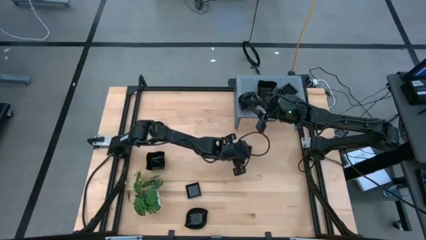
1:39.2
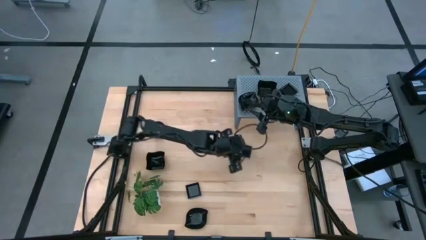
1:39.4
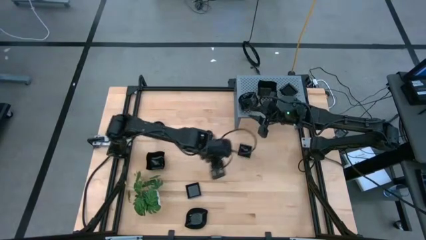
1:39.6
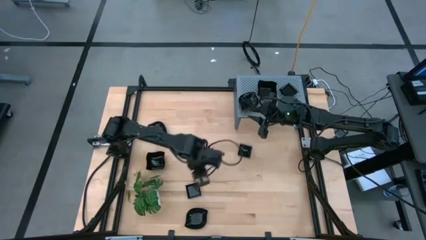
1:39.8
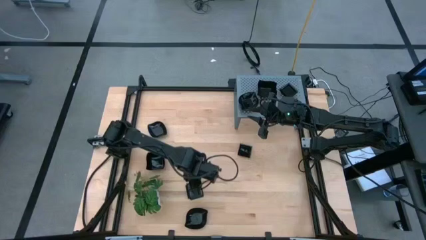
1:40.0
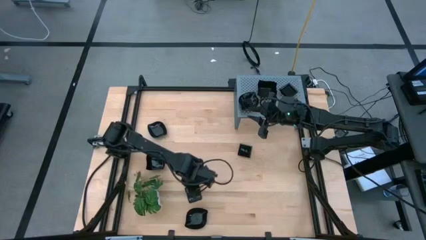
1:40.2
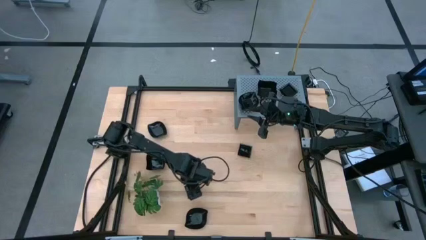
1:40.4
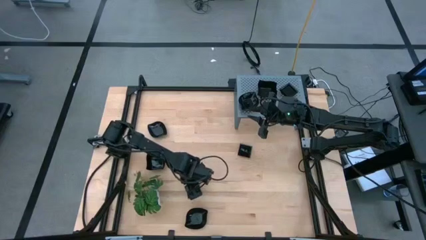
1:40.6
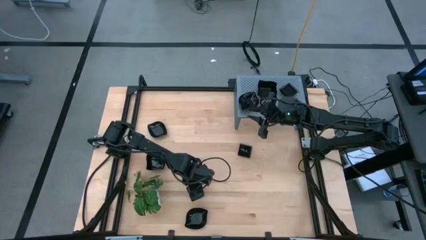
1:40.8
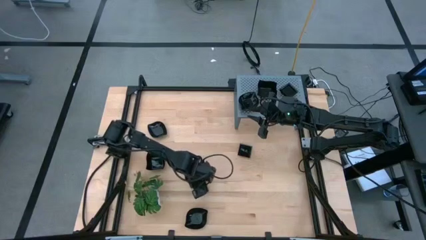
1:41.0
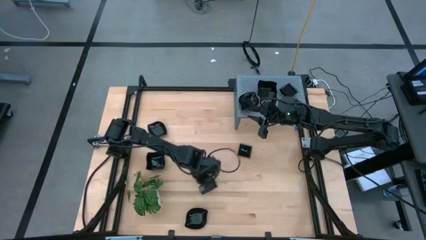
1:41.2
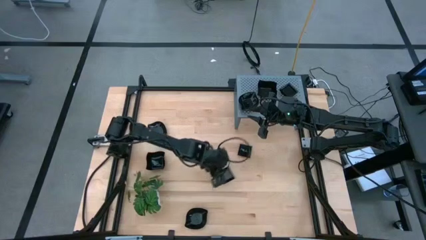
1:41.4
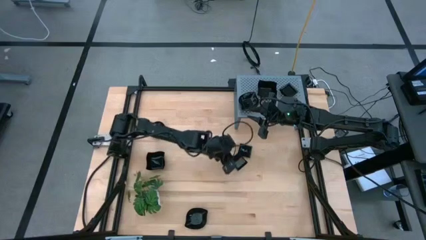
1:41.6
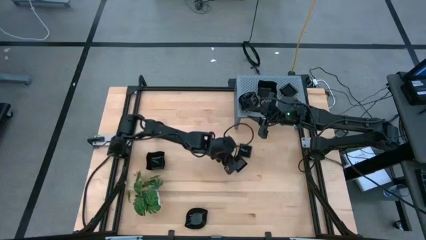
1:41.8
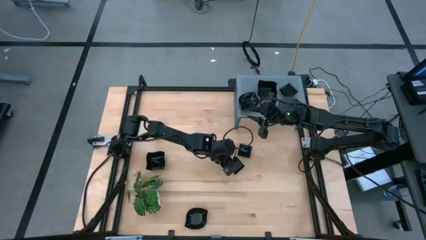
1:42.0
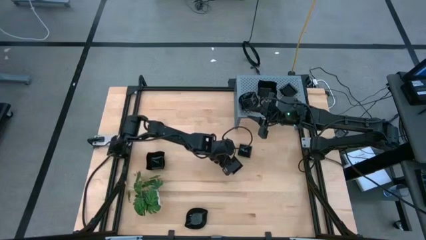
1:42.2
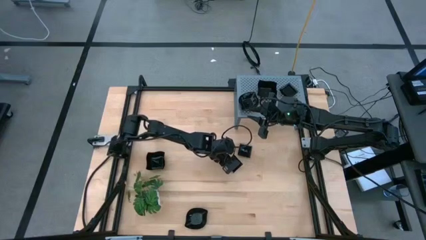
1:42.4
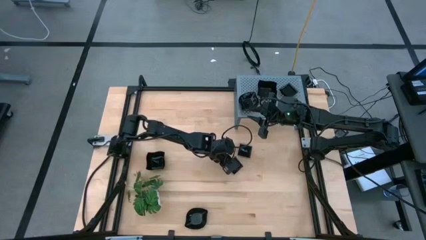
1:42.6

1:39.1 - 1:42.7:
Task: Pick & Place Mini shaped plates
Move the square plate to the middle of the table

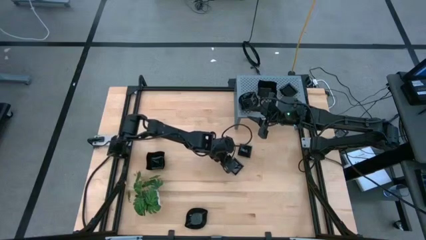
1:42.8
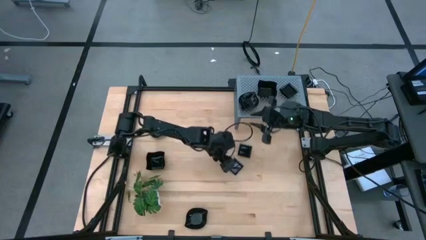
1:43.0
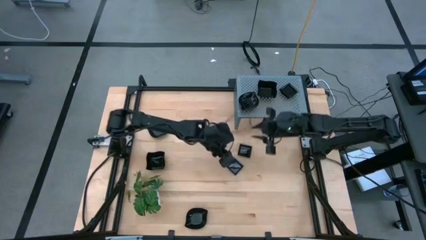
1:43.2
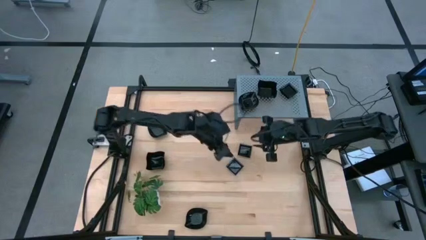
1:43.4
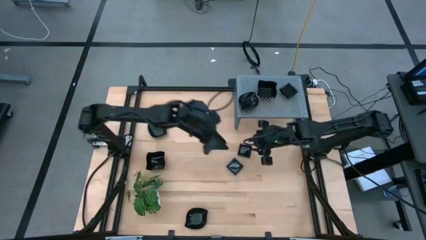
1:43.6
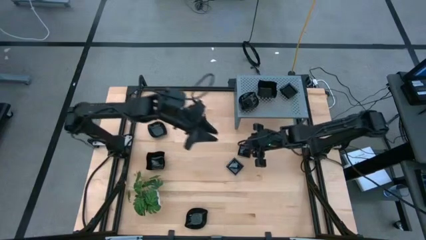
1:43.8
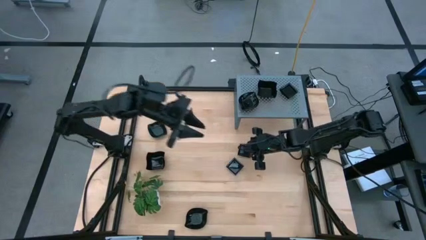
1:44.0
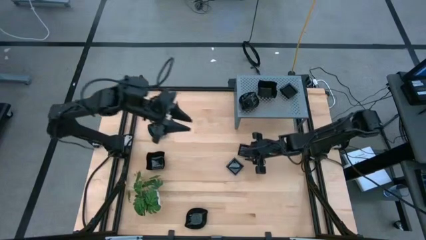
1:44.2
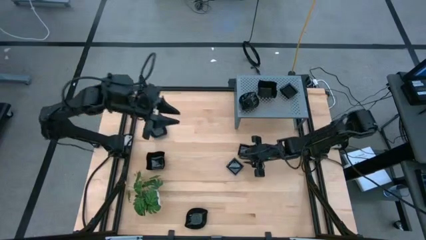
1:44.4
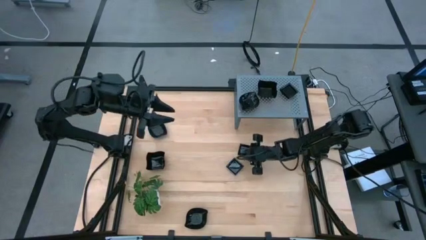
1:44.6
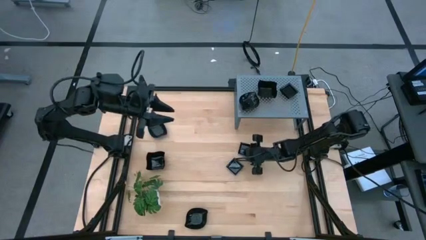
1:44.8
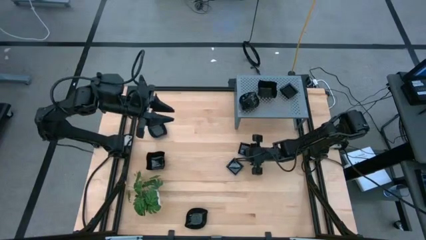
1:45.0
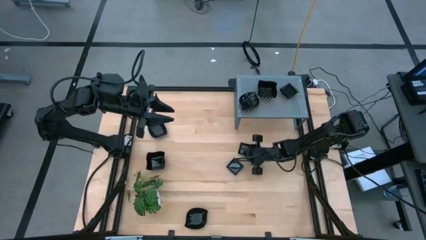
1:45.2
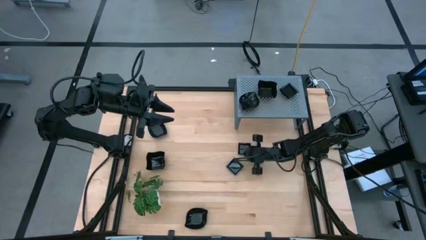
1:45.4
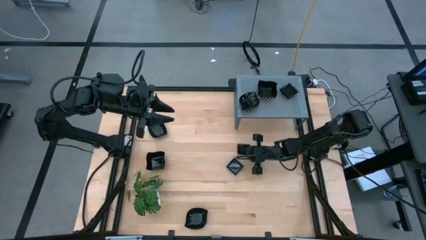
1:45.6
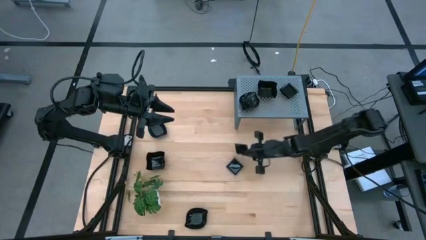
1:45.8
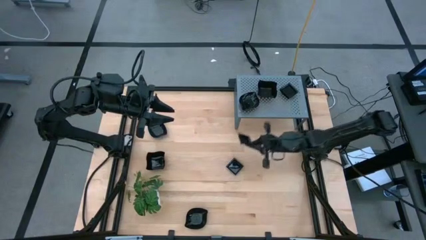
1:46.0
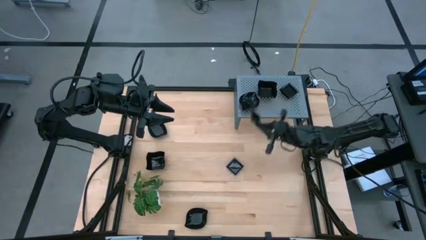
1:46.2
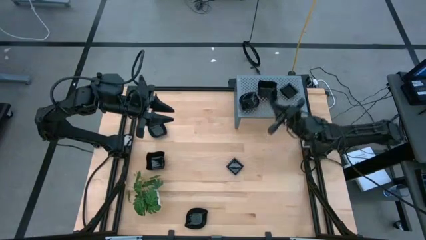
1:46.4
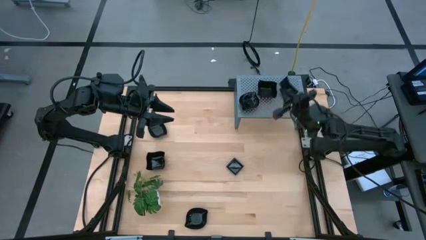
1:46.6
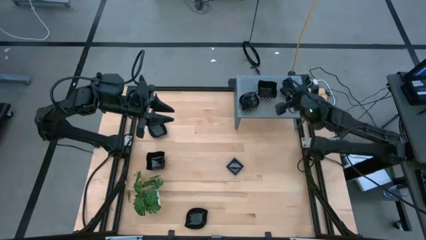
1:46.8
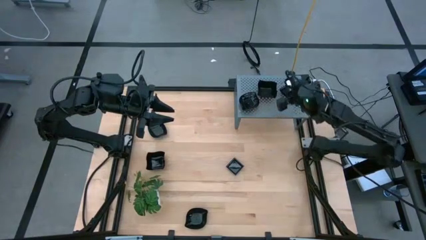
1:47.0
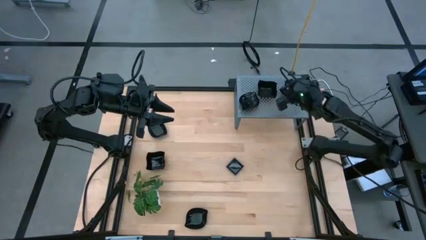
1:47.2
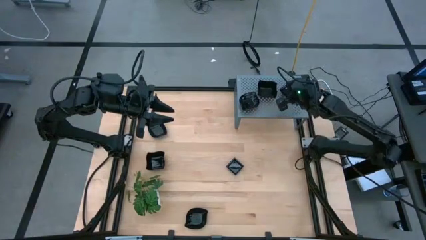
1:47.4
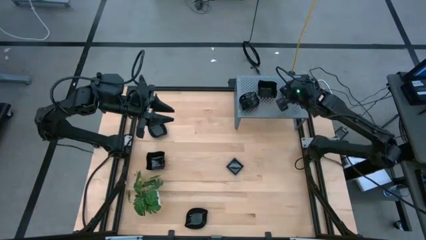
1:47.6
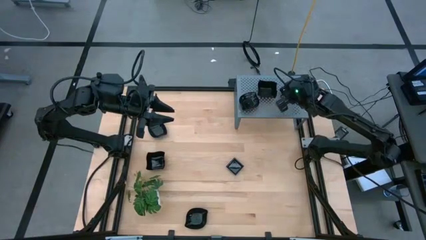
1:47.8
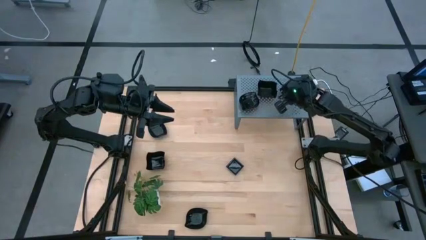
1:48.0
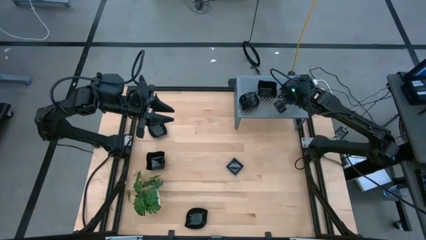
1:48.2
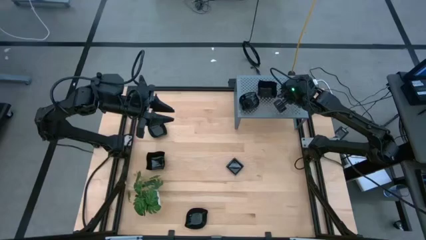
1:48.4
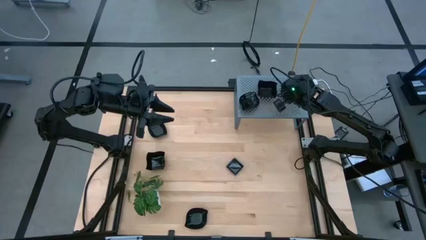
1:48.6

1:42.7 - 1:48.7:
Stack the square plate on the square plates on the shelf

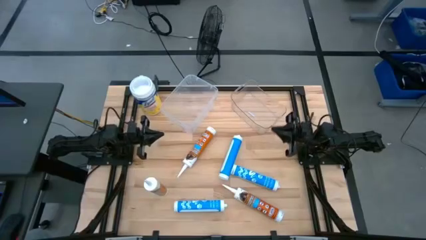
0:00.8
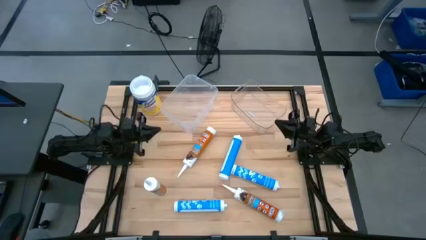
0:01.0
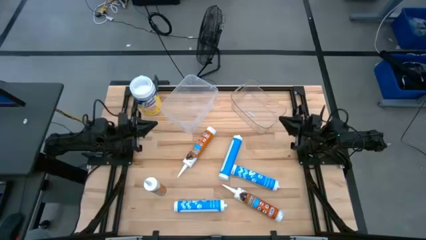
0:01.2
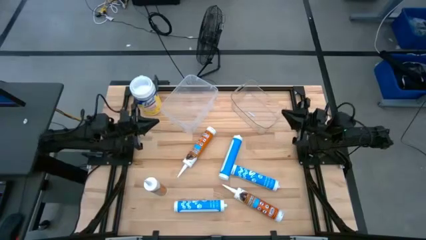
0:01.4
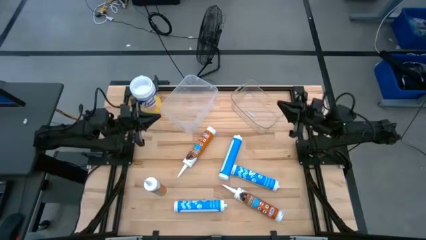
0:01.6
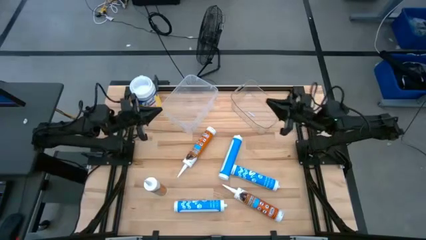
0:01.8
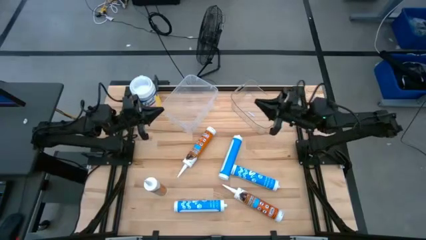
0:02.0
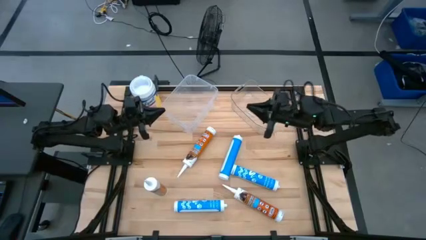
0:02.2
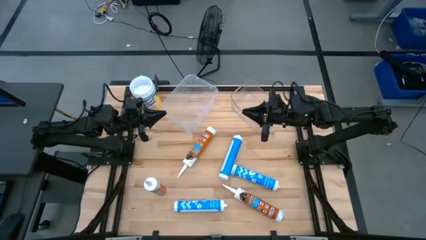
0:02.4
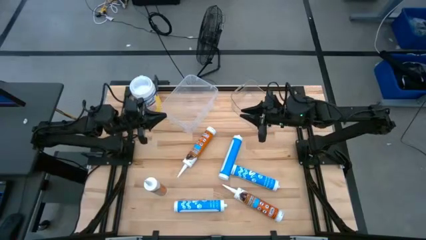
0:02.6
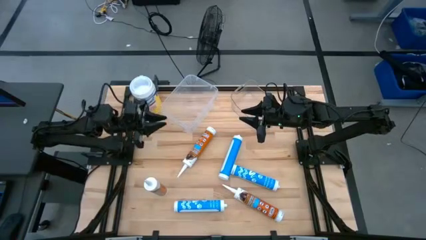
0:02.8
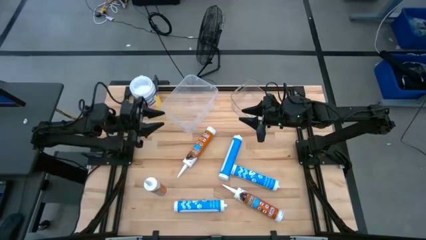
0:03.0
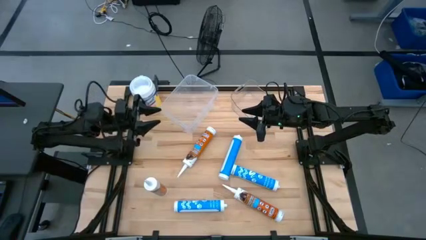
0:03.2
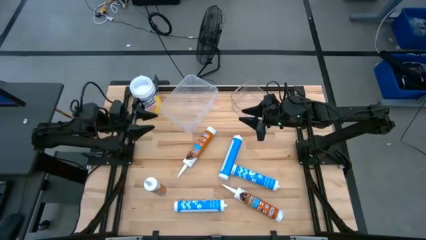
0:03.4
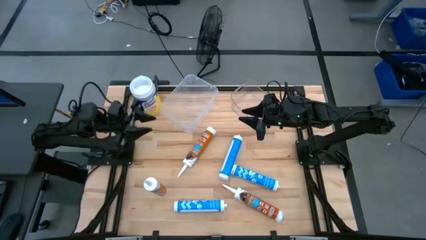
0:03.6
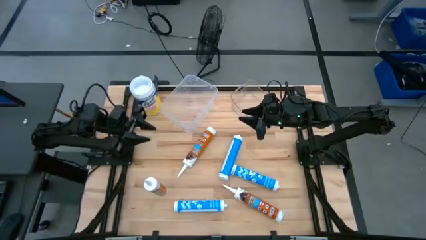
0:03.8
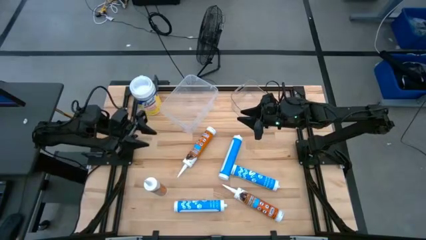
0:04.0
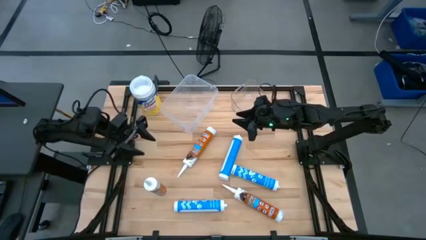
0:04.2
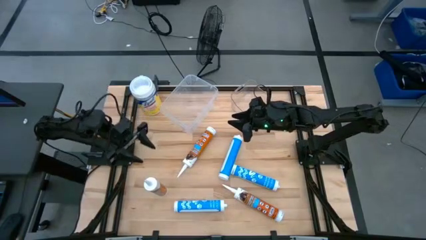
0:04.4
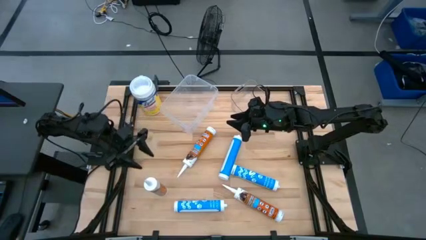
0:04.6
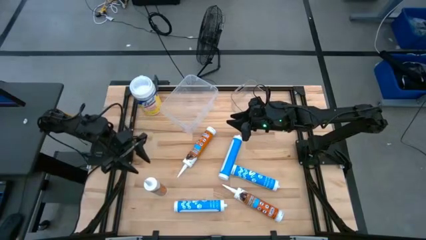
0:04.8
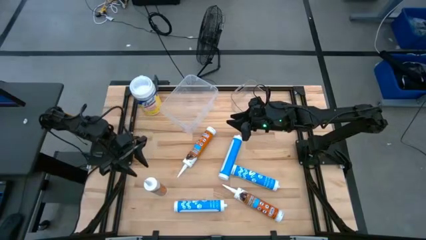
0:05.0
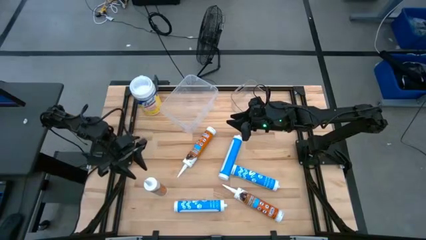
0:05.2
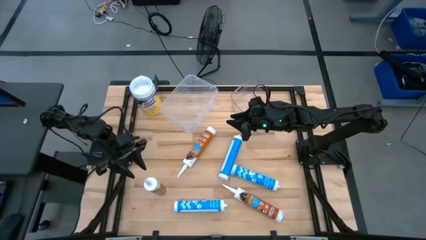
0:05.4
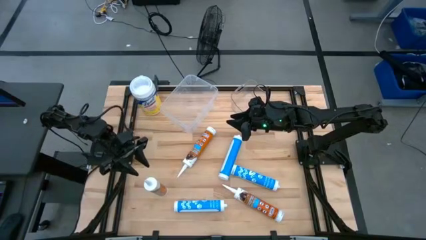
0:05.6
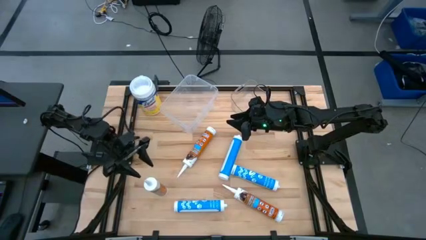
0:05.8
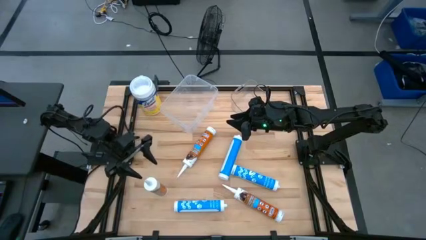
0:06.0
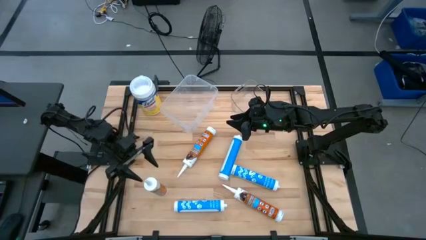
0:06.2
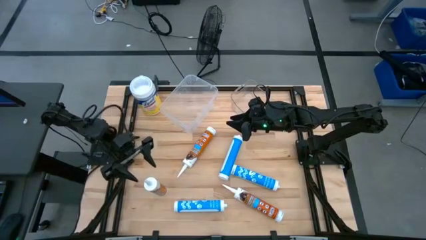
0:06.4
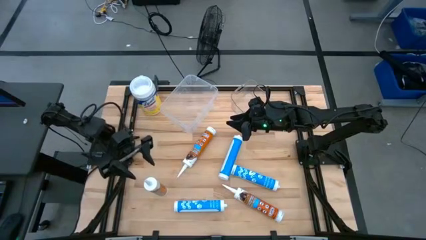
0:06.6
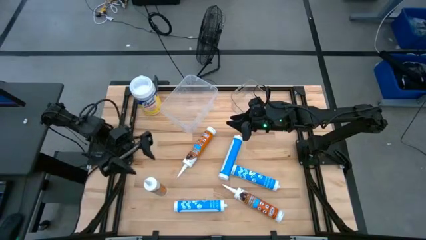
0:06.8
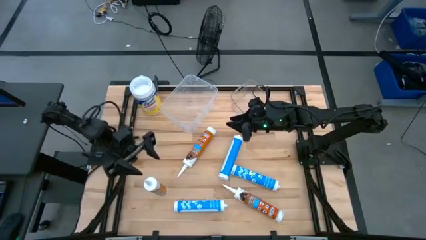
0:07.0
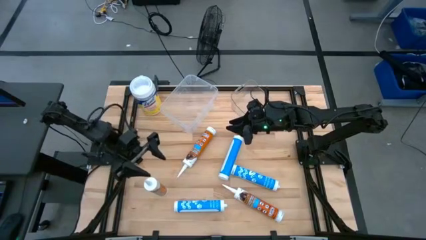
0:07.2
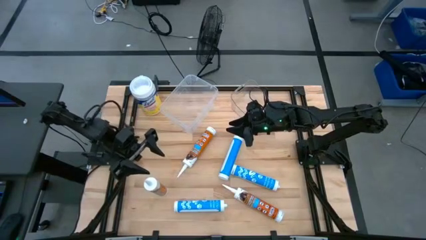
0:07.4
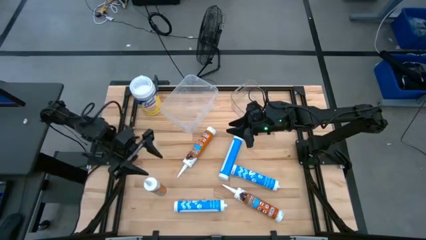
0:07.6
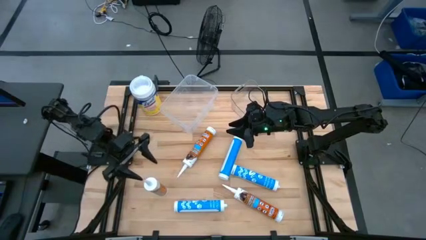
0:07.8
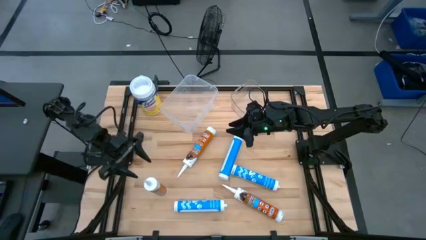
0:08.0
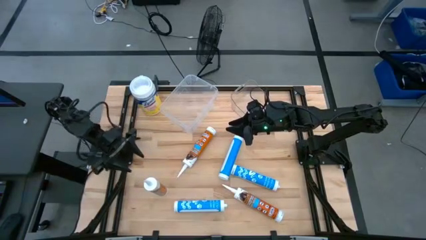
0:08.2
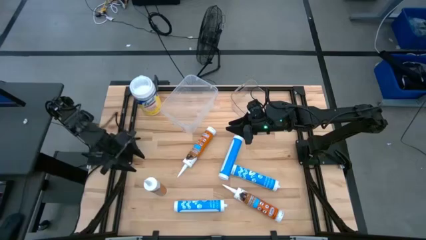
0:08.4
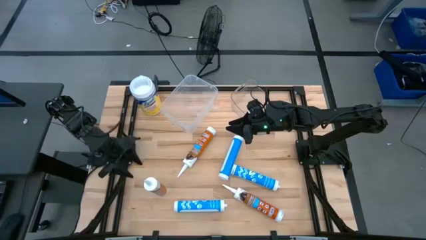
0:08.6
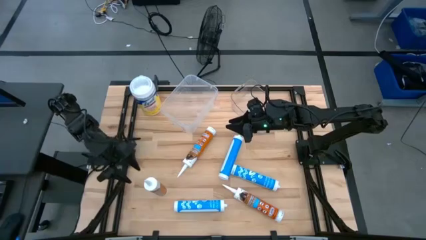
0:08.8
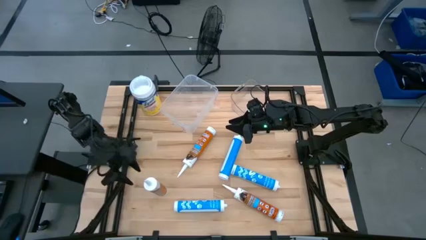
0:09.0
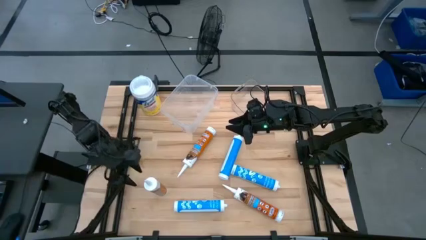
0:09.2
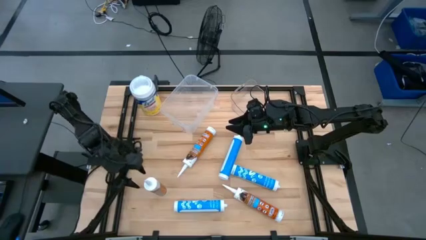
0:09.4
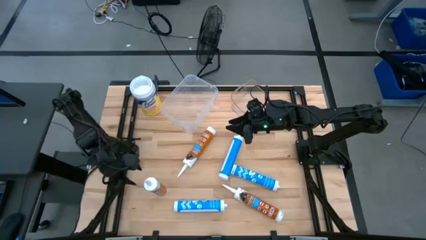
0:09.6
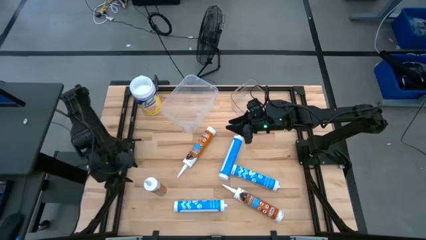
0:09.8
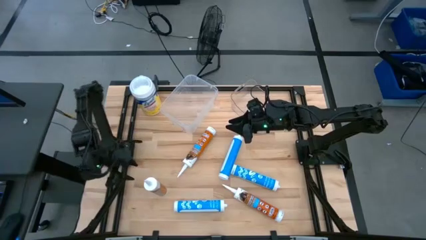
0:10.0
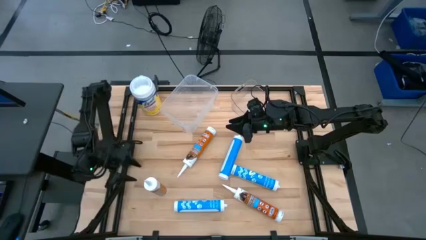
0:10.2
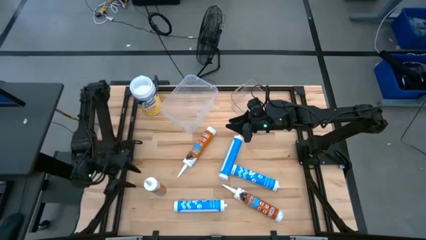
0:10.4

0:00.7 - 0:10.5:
Task: Pick & place silicon tubes, Sealant and Lysol wipes
Put the left brown sealant into the white transparent bin
